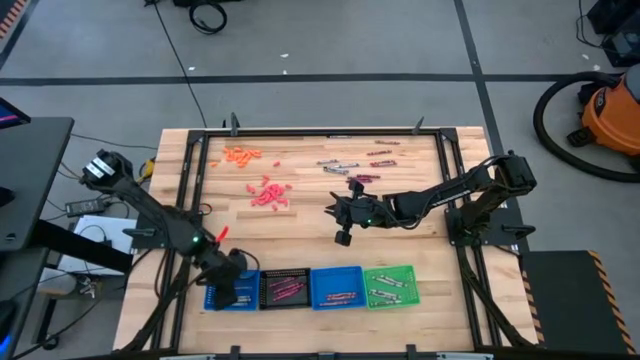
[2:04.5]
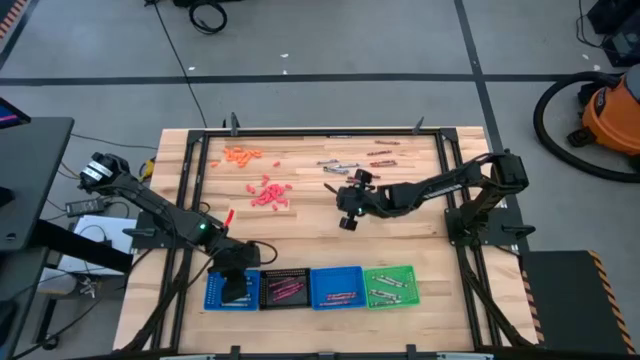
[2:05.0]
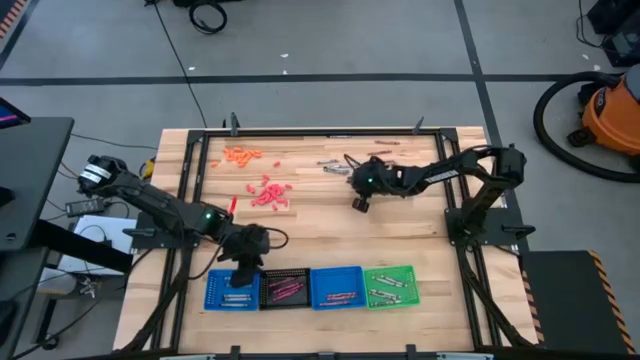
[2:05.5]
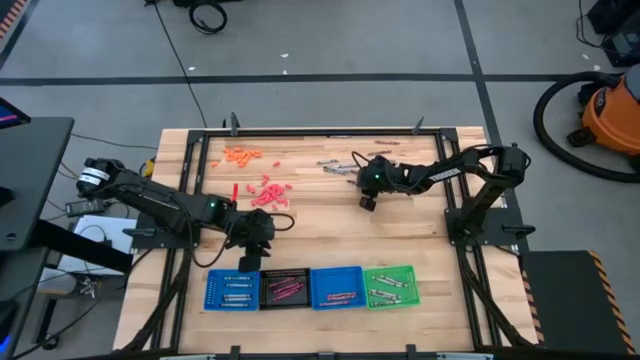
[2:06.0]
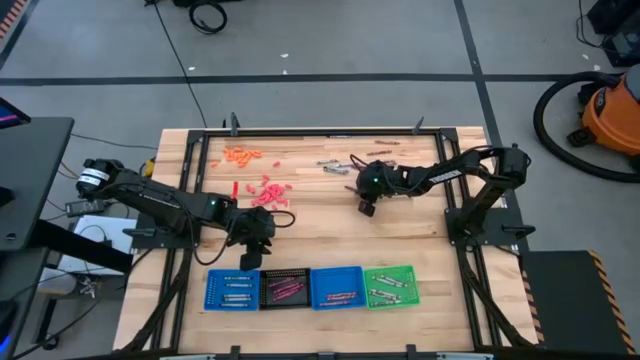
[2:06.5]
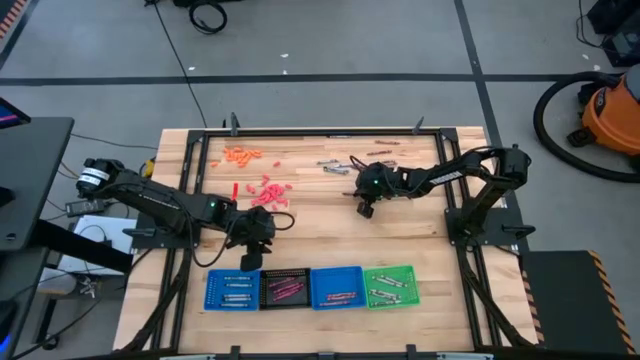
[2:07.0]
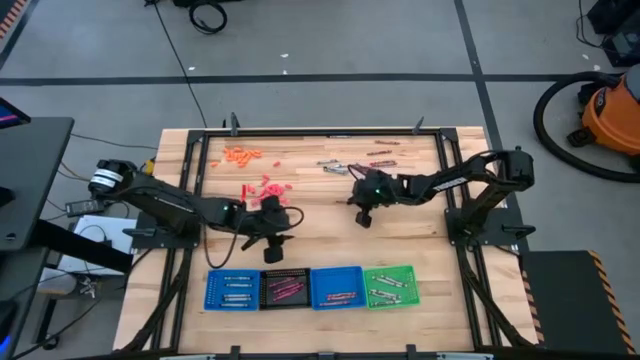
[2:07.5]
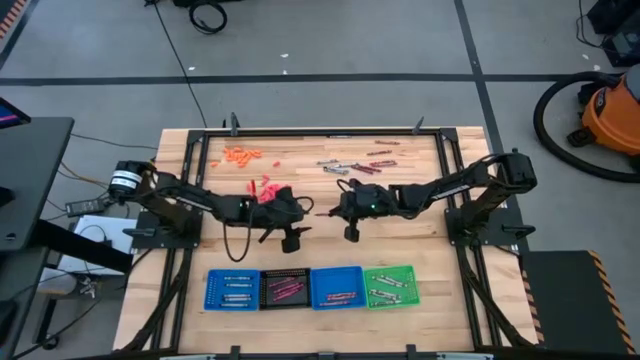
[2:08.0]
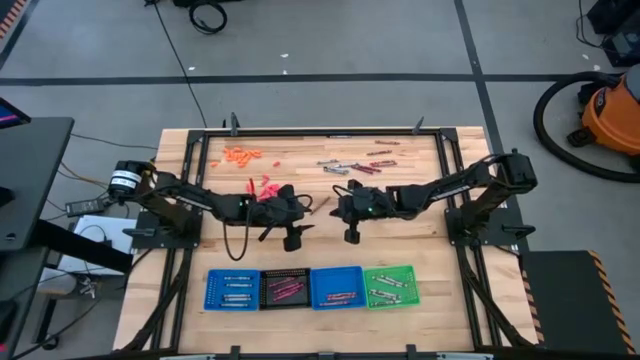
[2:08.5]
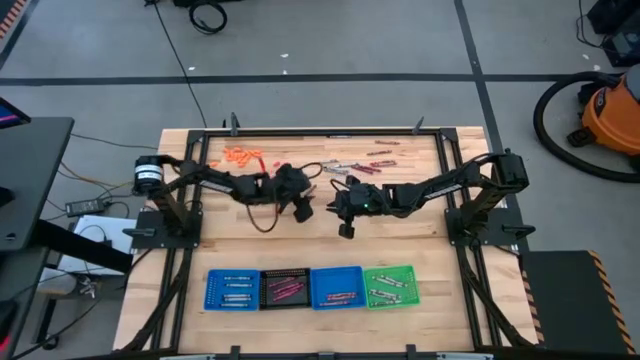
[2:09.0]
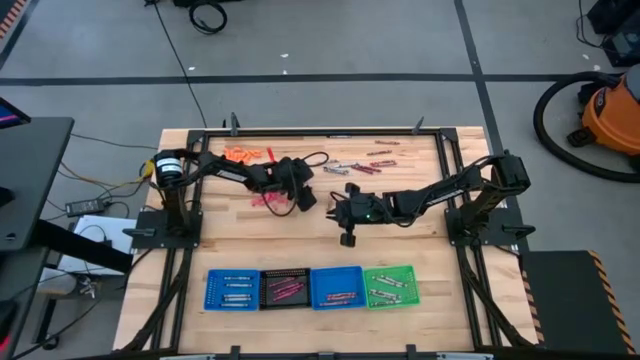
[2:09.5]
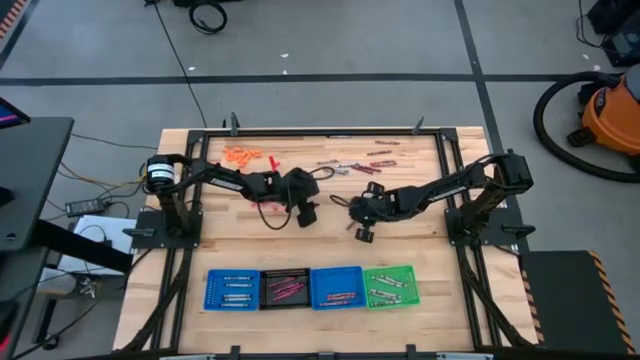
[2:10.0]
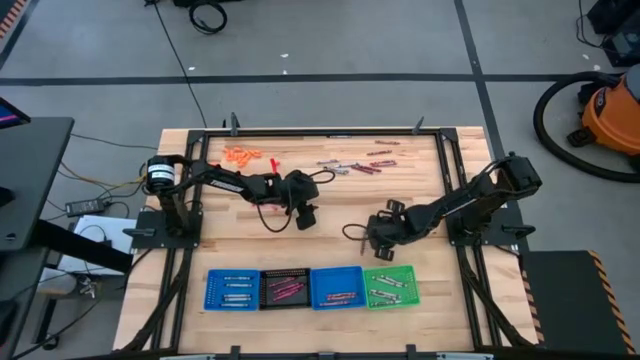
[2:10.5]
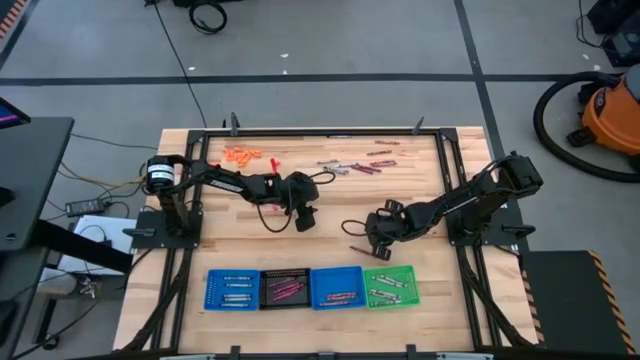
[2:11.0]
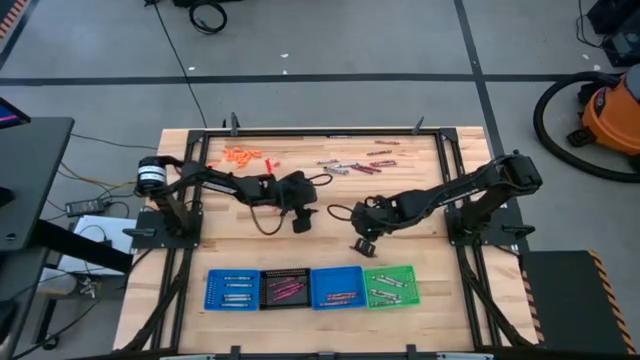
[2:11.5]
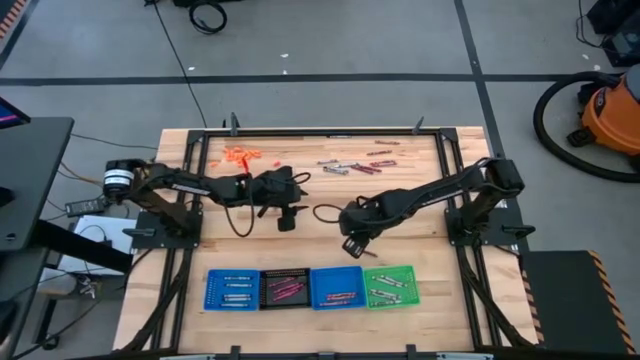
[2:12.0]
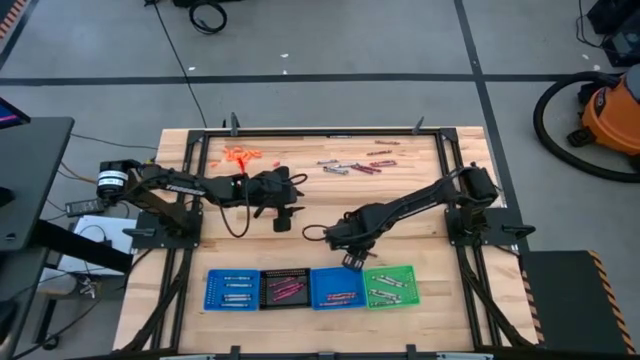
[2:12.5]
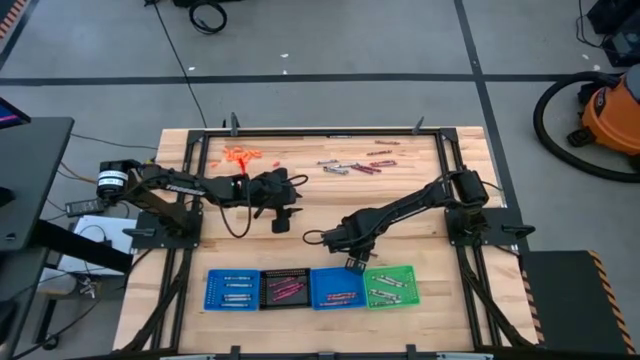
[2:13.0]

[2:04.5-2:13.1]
Task: Sort crayons
Put the dark pink crayon into the black bin

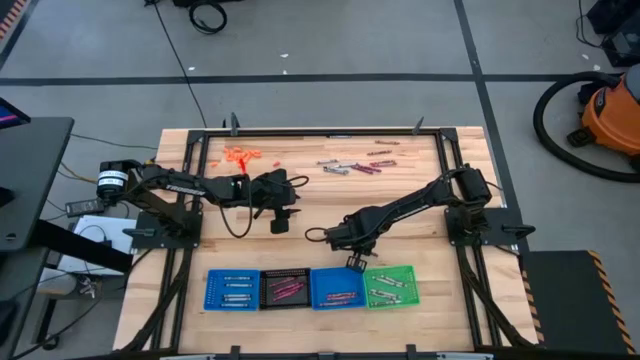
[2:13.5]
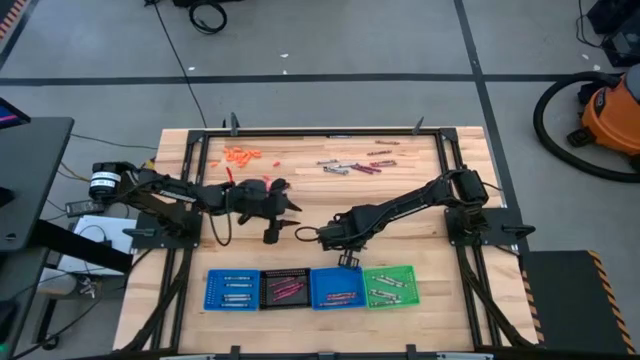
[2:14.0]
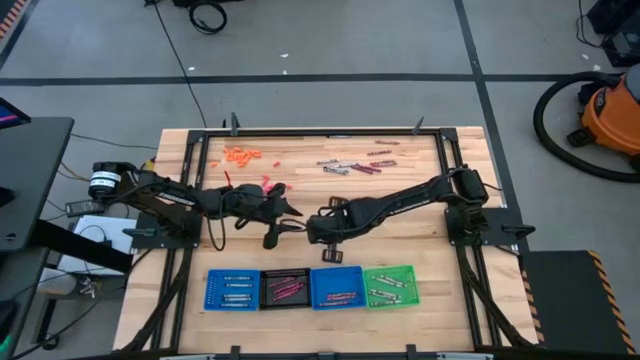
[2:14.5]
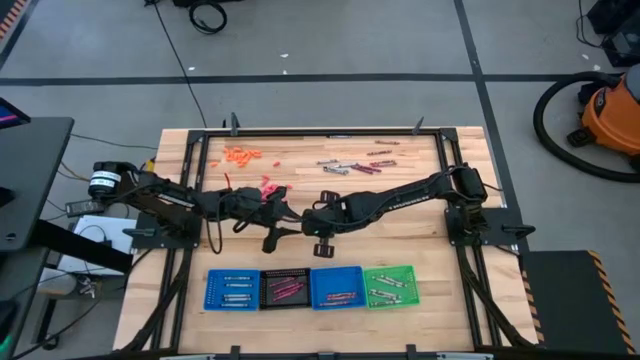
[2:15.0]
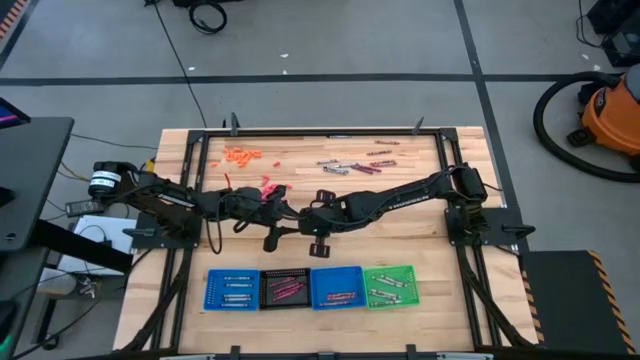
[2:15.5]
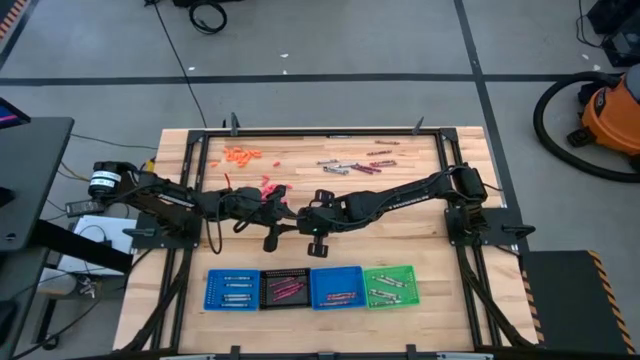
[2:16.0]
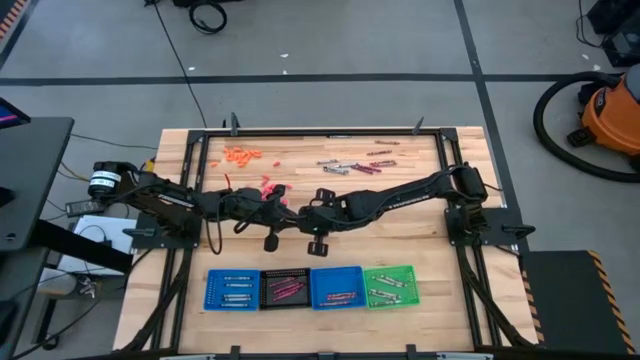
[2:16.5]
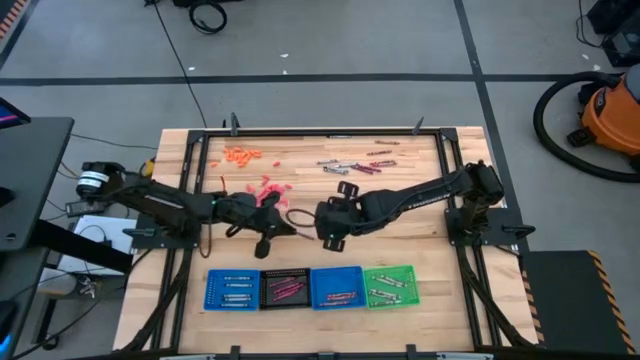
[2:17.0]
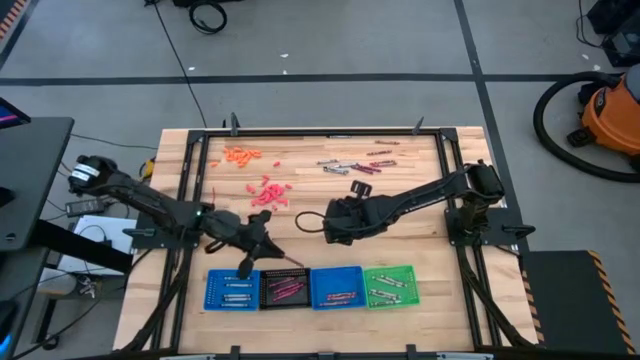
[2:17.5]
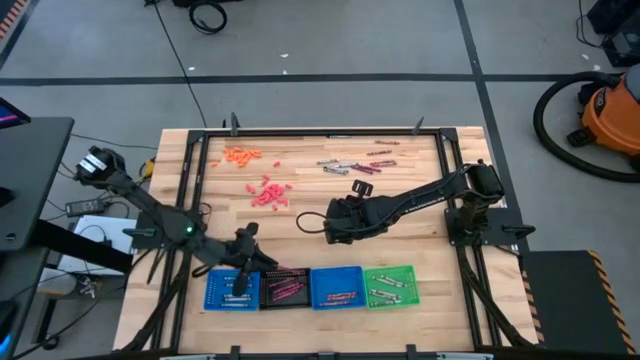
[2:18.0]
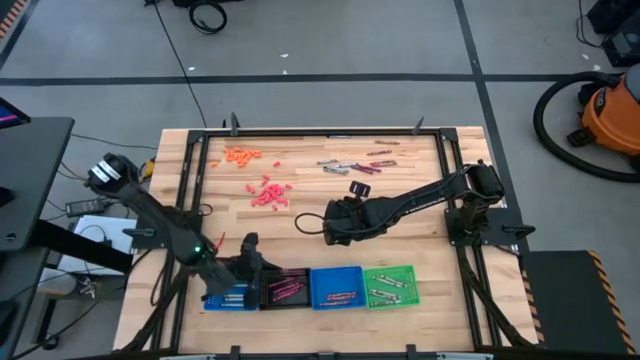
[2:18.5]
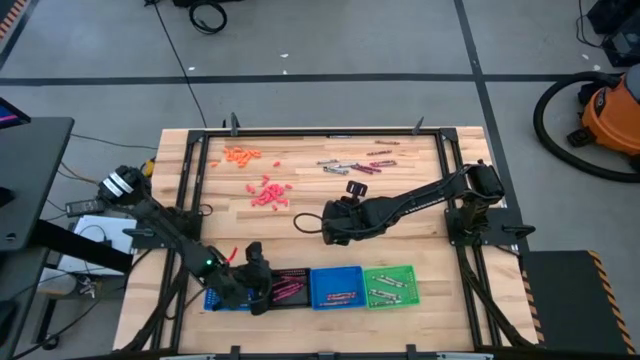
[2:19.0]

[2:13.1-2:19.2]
Put the dark pink crayon into the black bin

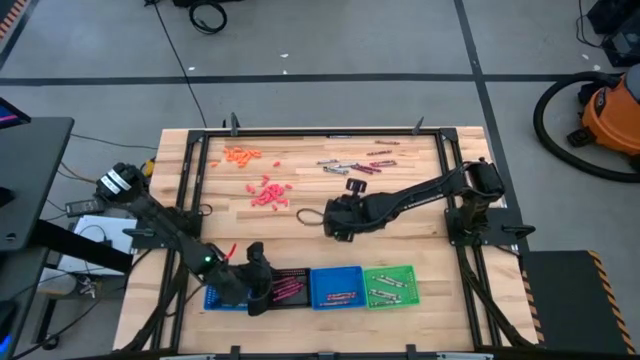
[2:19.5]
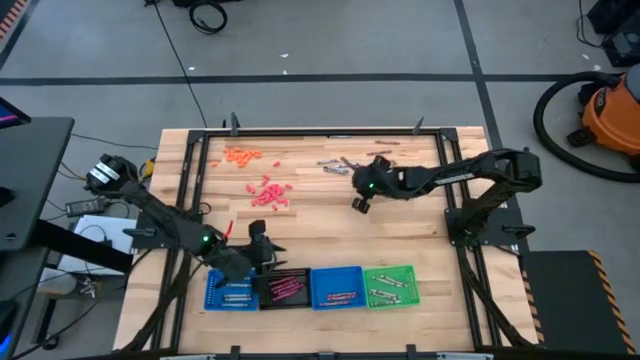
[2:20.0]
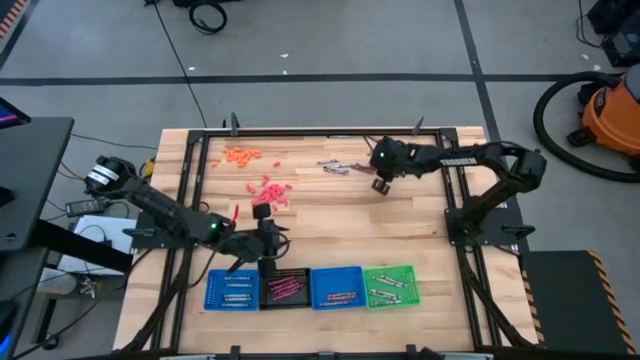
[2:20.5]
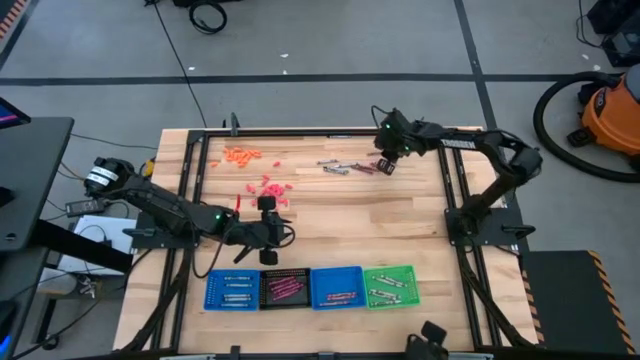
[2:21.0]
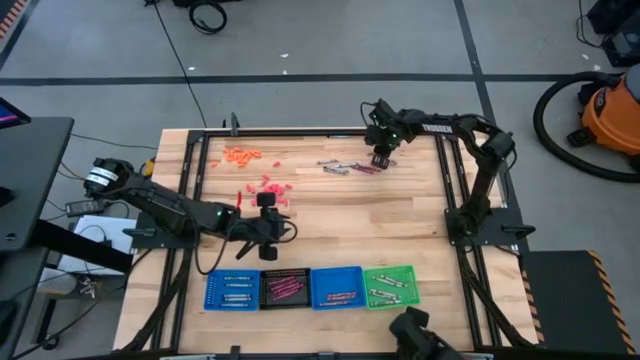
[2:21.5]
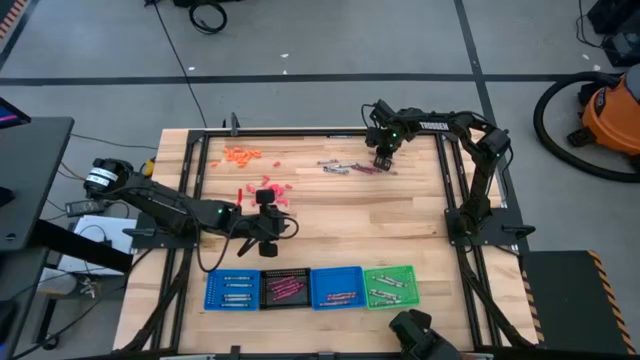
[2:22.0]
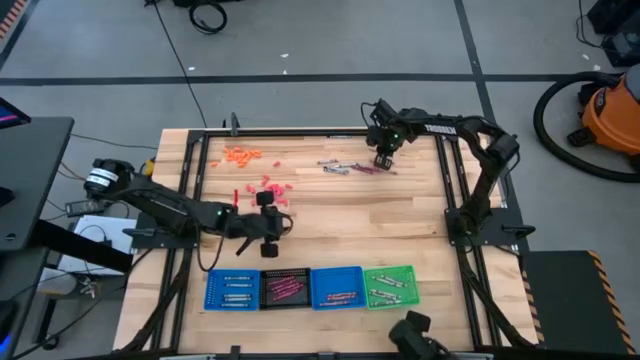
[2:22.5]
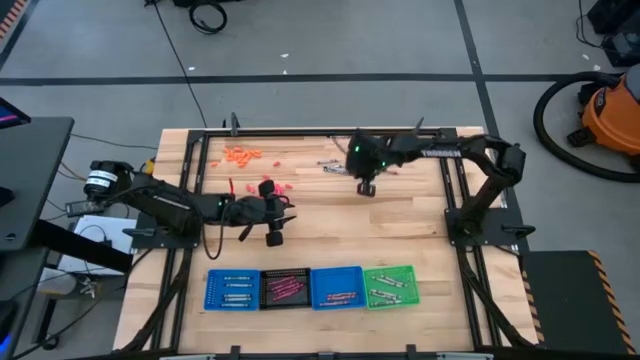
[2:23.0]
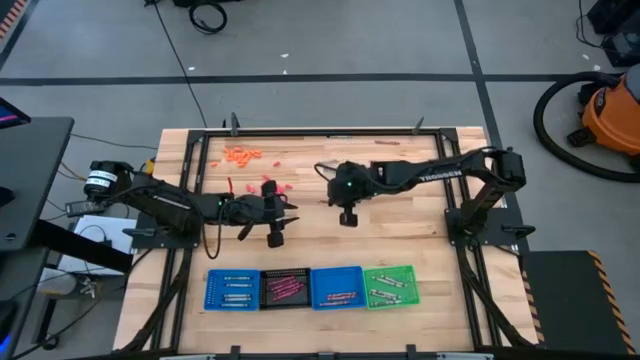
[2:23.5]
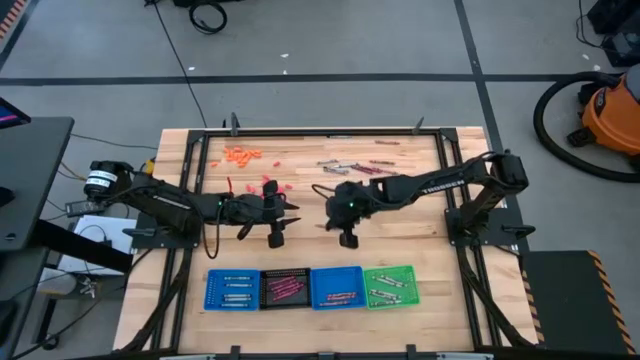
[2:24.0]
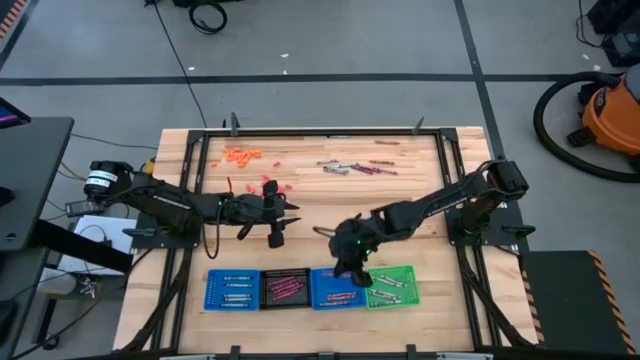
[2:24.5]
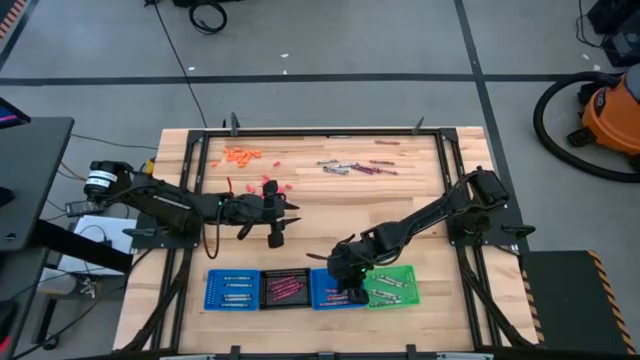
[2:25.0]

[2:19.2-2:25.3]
Put the pink crayon into the right blue bin

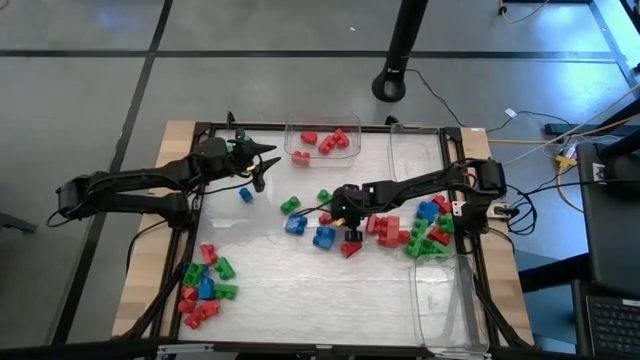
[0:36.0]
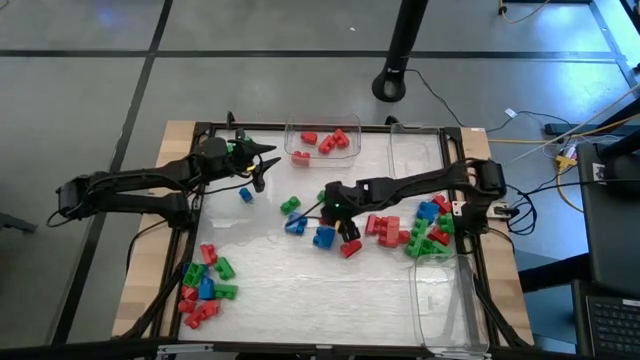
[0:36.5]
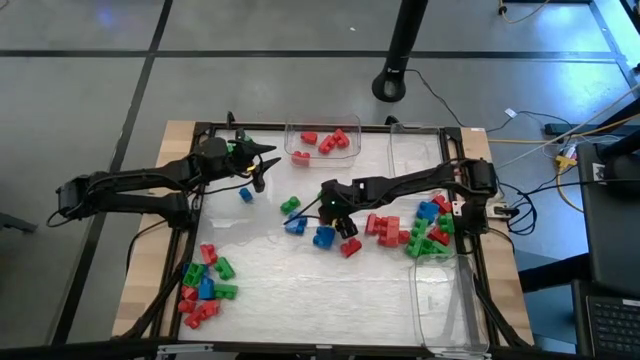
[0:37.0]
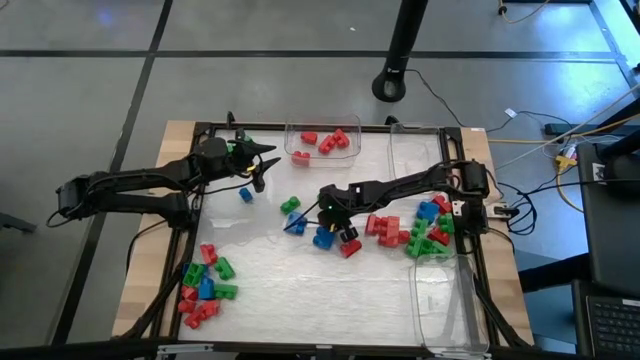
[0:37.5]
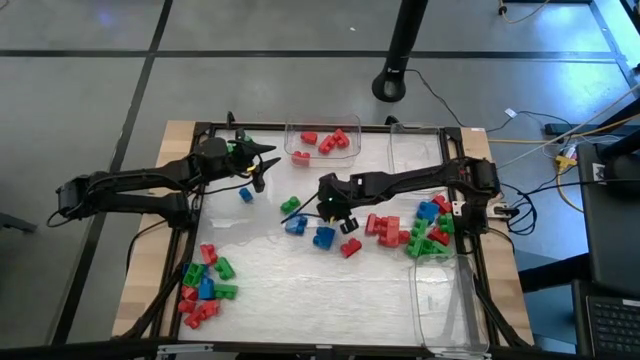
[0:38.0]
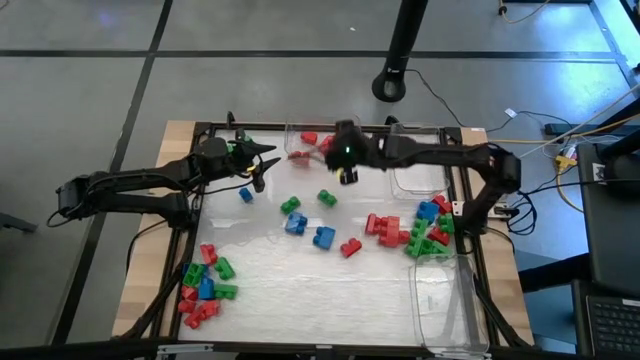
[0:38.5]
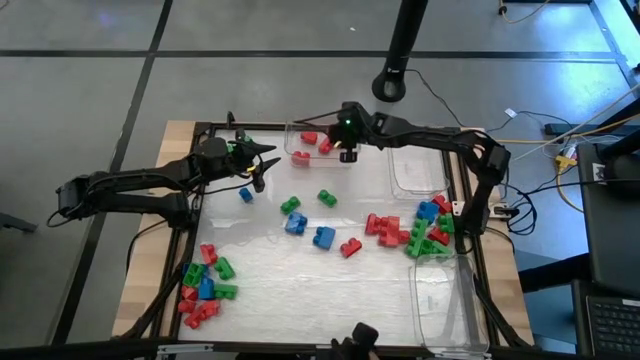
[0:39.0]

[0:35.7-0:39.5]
Task: Sort blocks
Put the red game piece into the top left transparent bin
